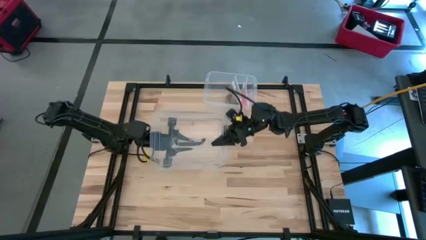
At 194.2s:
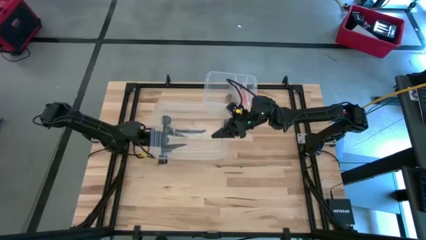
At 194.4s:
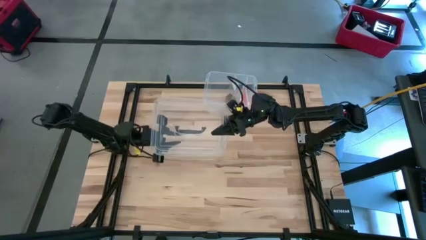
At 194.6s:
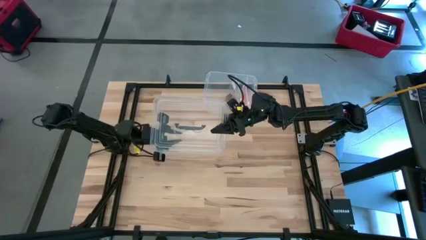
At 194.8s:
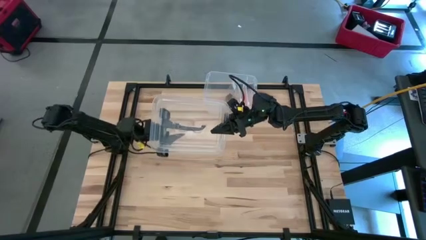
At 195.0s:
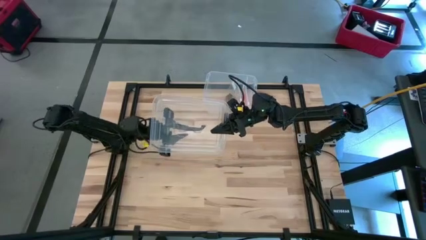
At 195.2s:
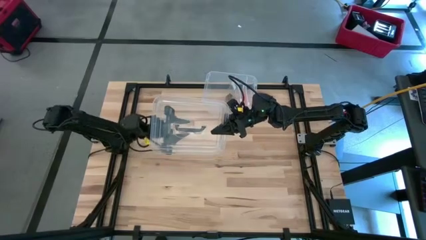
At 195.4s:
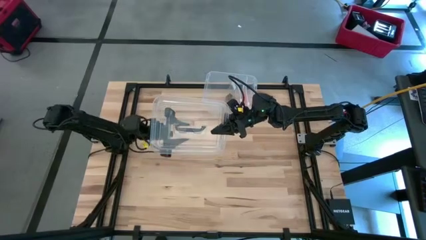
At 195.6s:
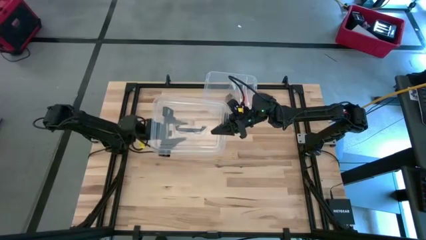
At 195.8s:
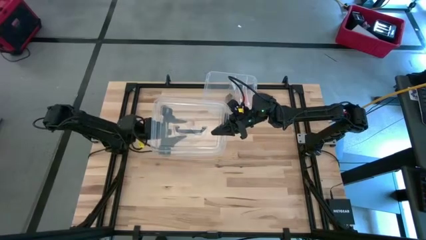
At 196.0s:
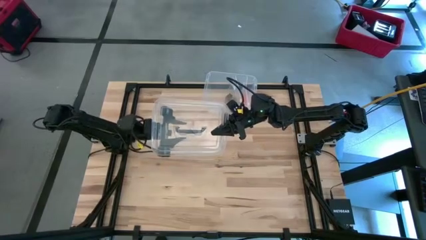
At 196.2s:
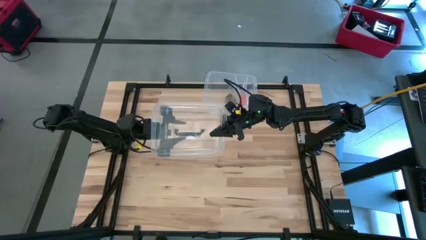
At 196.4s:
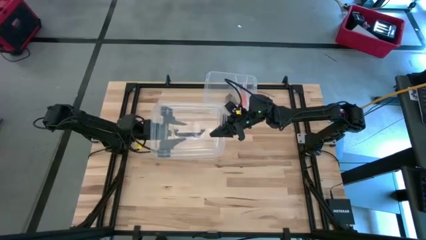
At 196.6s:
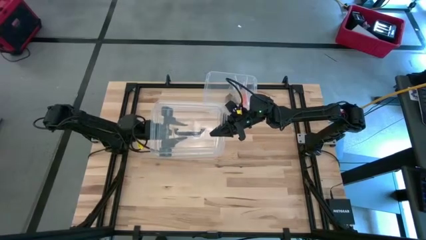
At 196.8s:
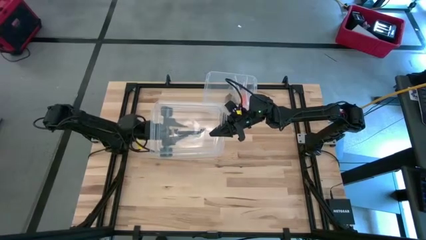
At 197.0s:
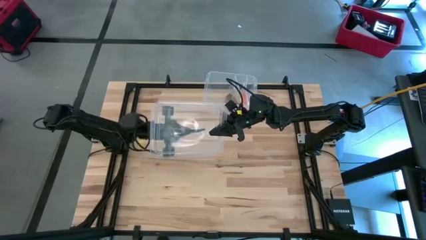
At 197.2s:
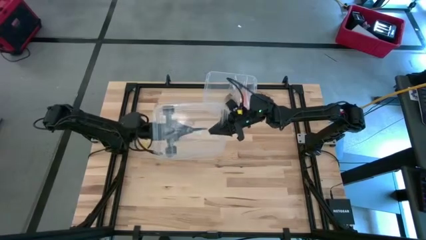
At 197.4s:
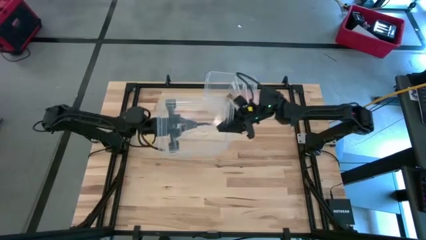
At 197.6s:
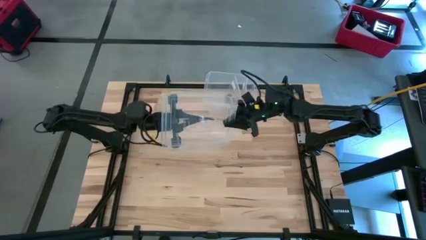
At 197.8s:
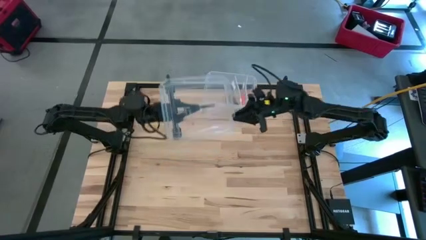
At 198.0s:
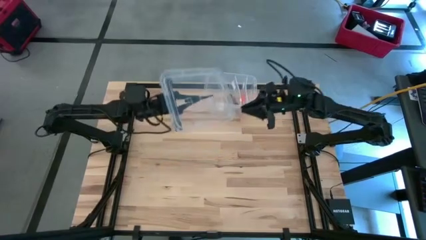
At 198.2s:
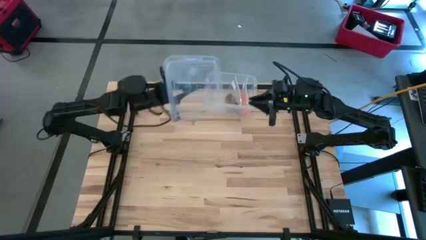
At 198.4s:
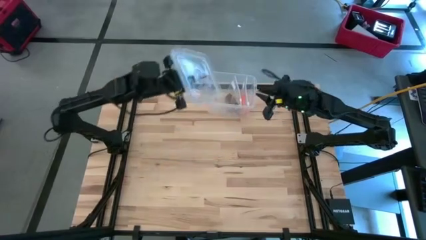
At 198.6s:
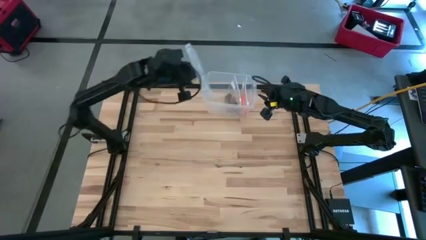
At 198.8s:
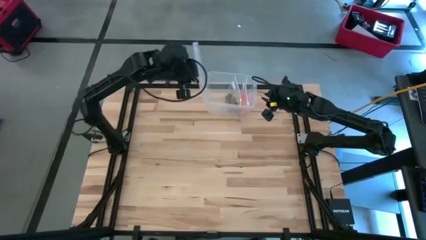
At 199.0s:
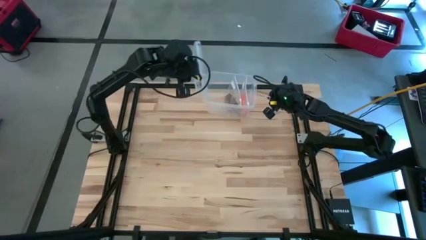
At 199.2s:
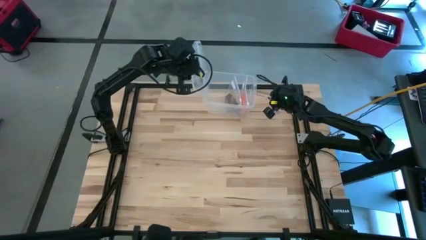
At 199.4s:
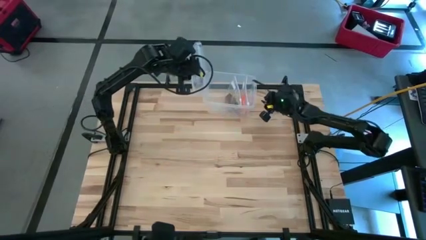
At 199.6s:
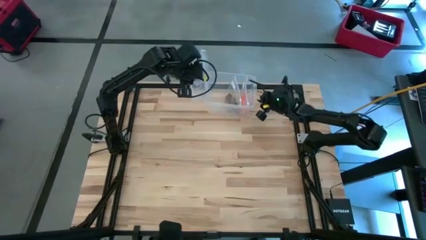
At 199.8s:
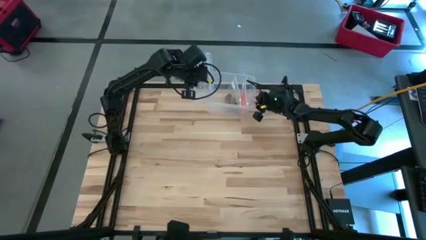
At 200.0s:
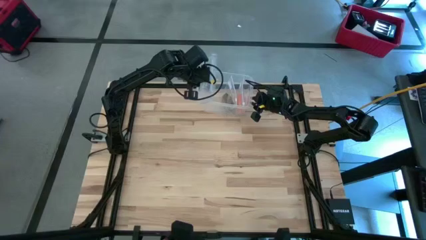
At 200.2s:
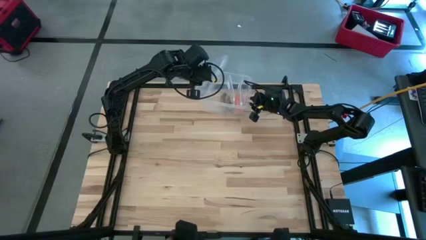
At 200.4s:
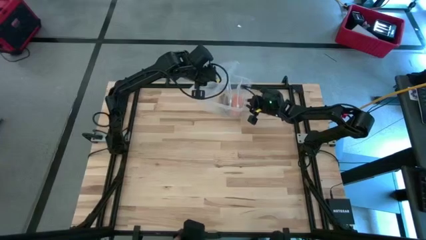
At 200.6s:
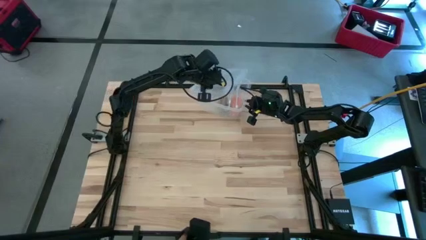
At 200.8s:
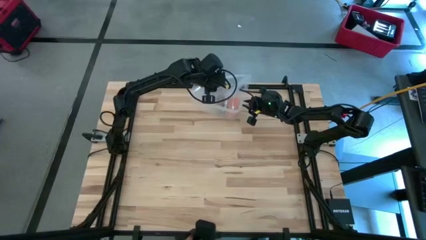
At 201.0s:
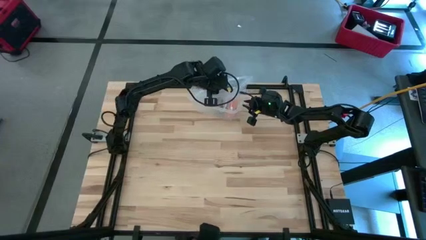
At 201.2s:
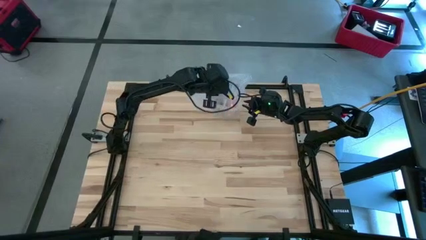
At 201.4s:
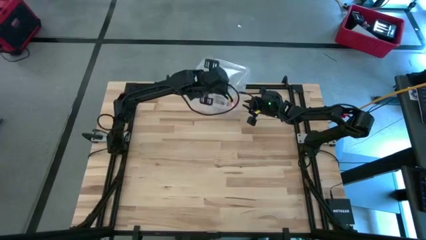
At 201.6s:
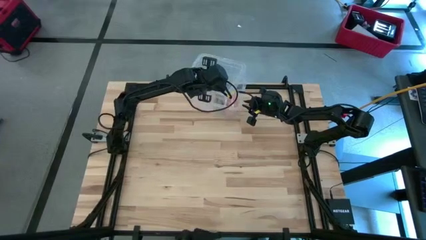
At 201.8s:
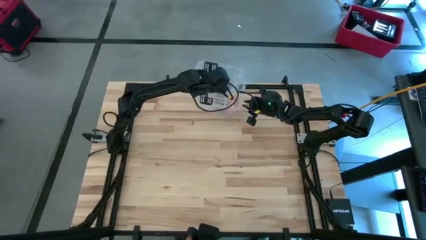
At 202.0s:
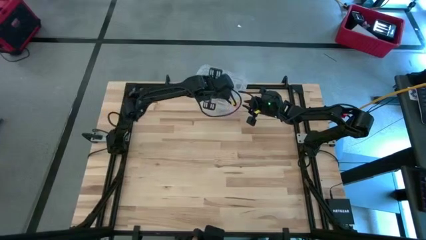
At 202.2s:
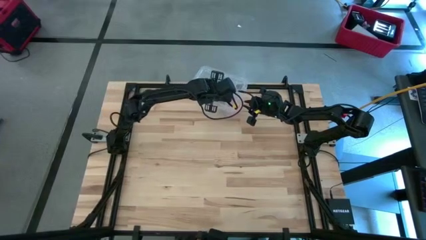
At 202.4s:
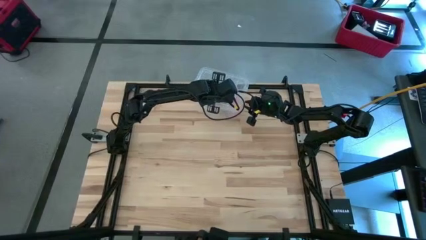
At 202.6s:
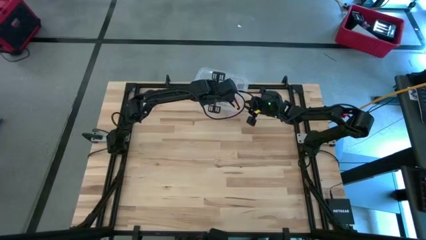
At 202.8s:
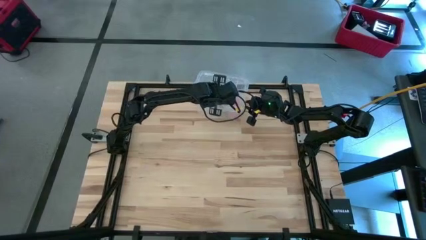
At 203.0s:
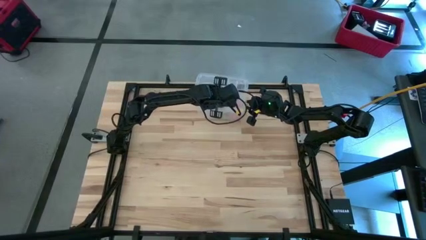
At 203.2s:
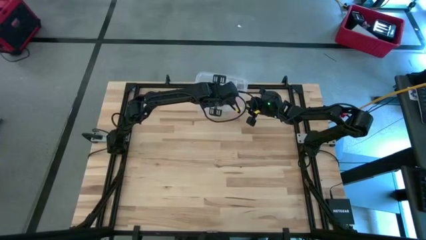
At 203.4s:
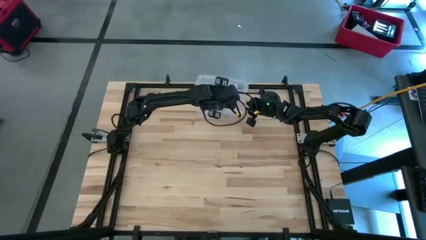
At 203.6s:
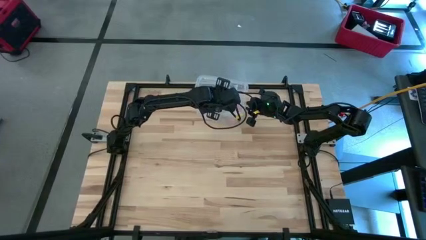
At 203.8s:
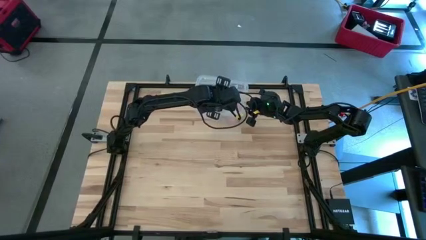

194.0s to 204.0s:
Task: Roll bandage
Close the container

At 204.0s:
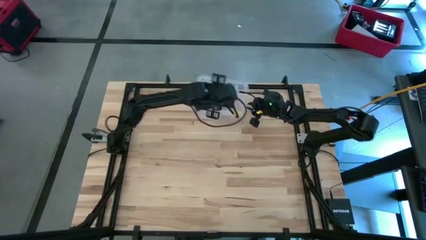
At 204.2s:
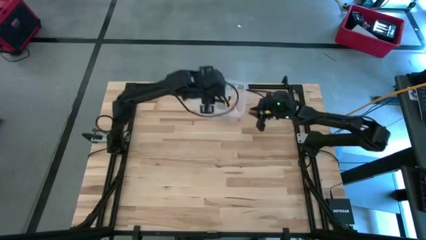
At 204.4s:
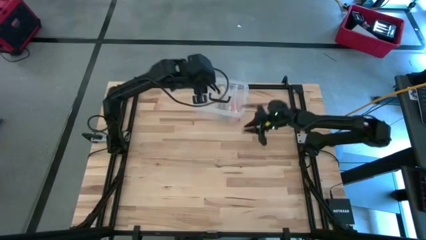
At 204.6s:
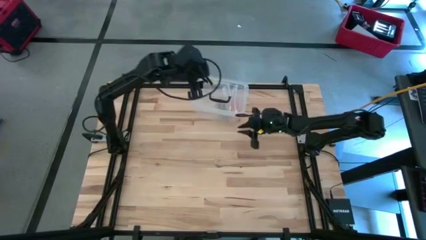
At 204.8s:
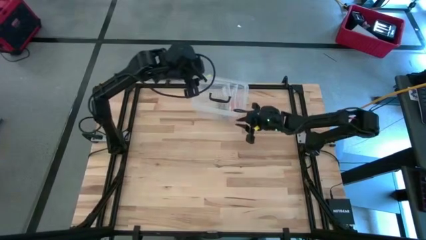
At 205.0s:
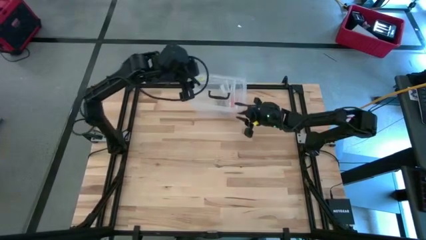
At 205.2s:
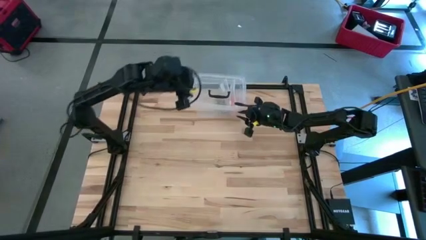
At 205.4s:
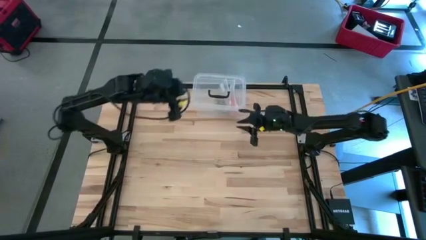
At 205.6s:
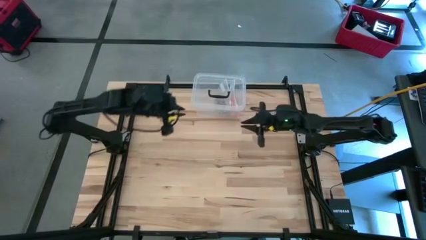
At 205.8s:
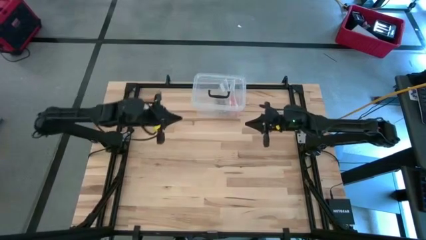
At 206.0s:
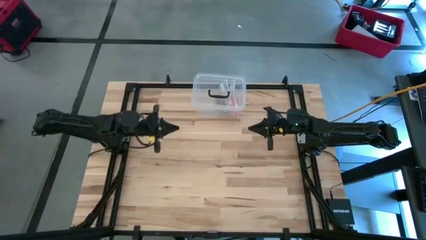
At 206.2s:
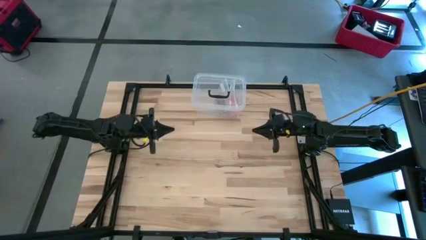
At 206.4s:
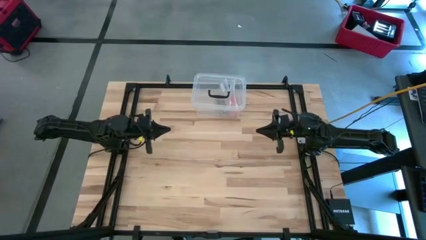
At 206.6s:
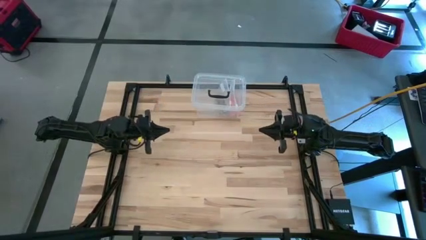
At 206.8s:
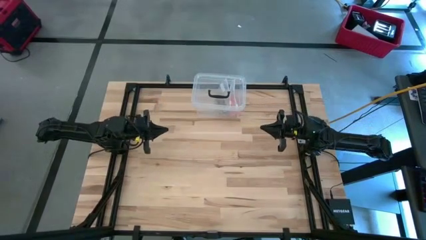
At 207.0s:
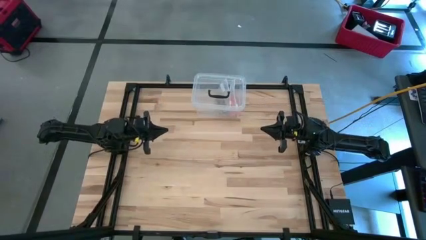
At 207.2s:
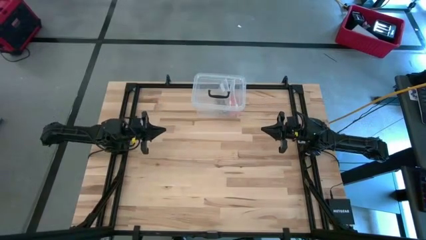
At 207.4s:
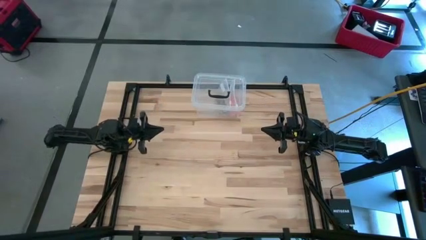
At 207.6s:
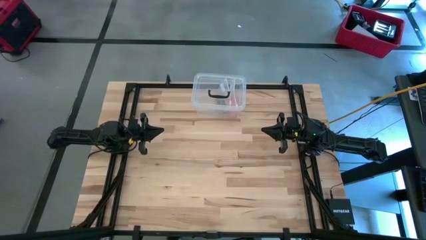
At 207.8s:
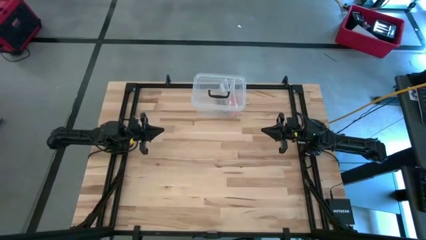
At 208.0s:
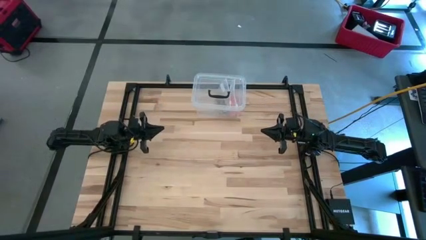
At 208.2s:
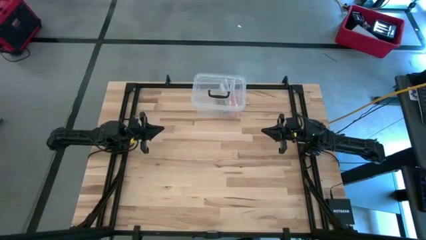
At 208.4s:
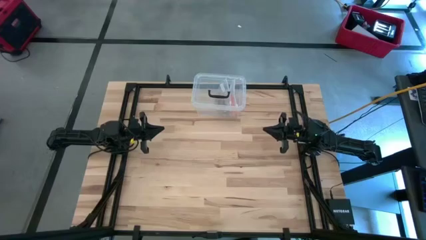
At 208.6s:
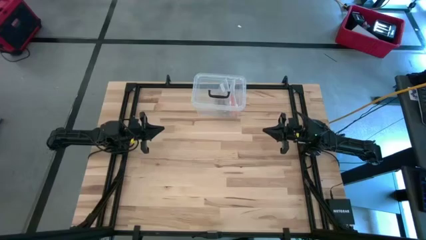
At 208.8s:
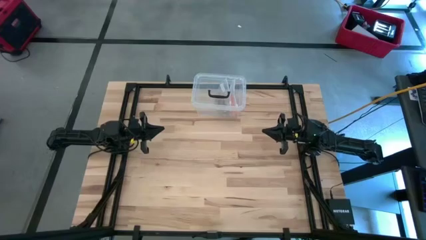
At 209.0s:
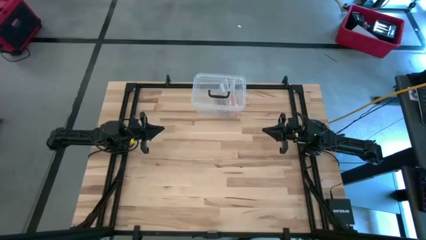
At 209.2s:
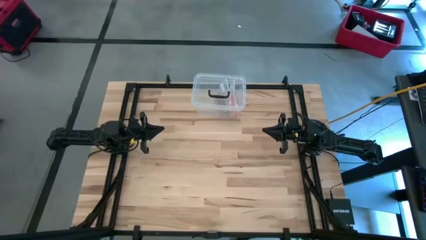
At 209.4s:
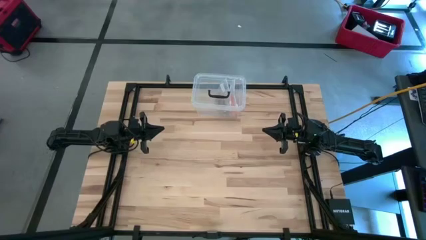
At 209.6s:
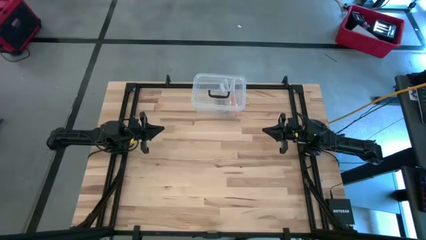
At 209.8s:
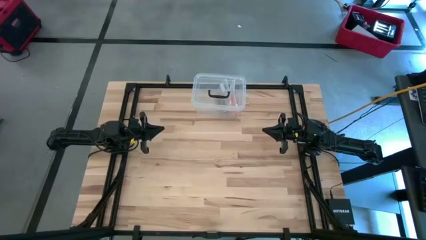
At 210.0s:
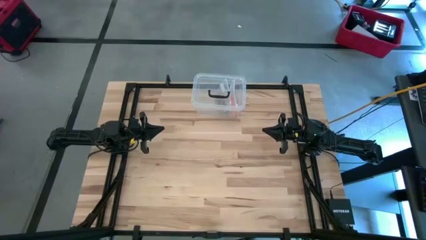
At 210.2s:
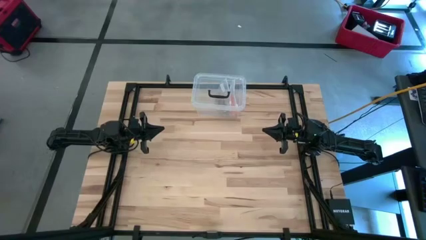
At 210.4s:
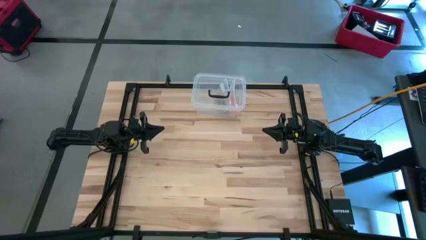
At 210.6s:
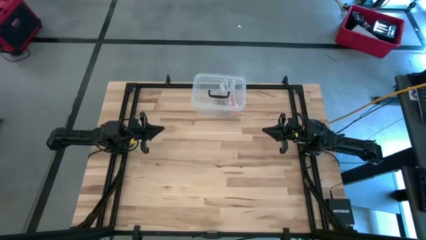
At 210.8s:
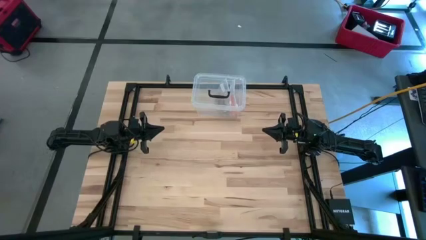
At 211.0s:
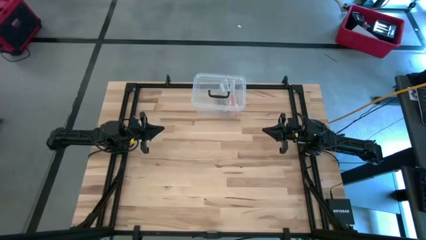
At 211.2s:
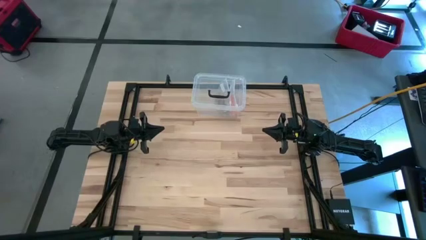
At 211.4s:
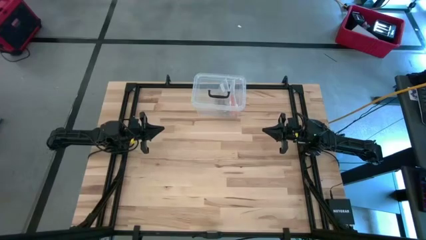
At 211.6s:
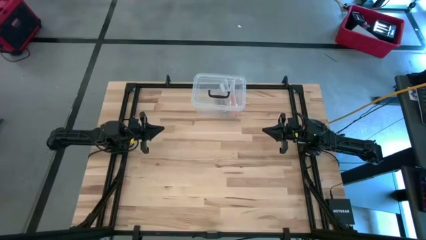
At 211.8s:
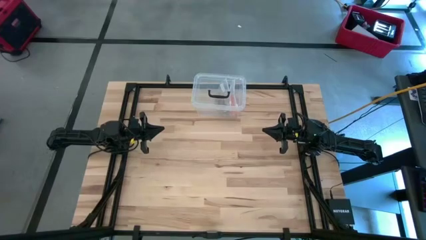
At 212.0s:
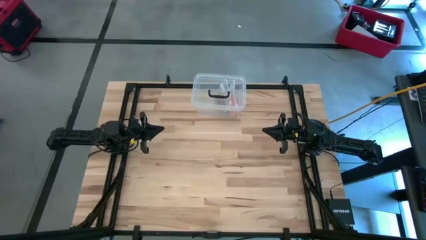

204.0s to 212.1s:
Return to Home Position
